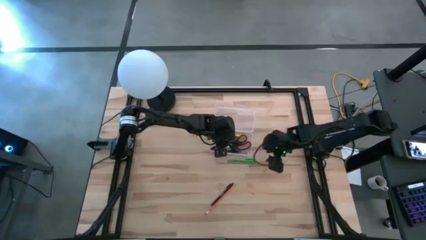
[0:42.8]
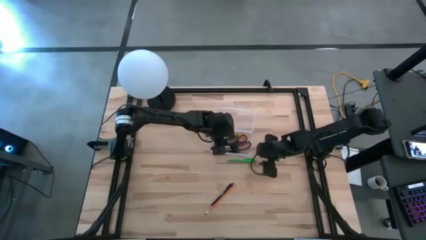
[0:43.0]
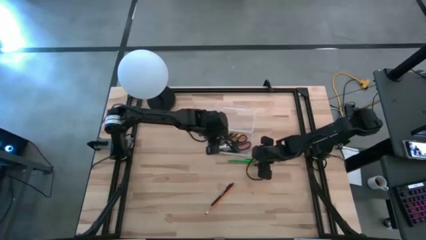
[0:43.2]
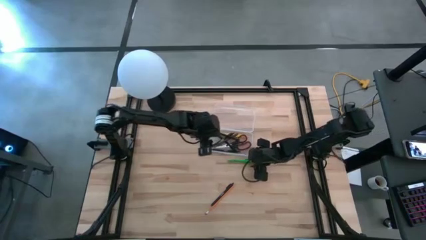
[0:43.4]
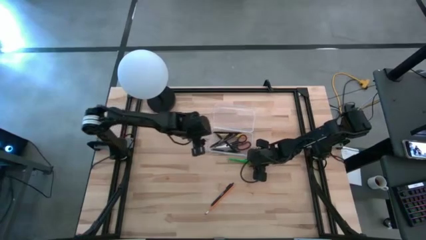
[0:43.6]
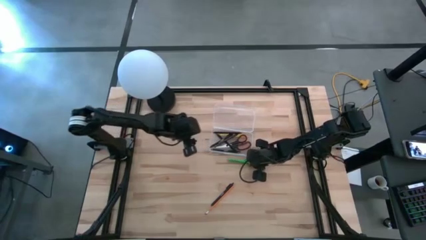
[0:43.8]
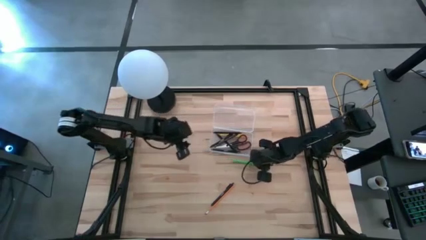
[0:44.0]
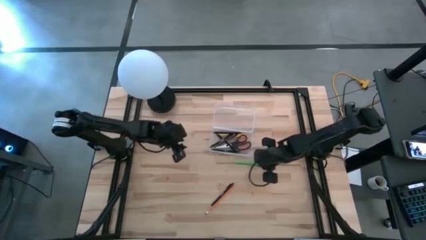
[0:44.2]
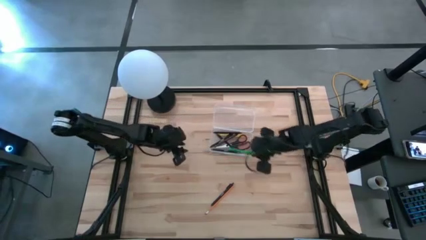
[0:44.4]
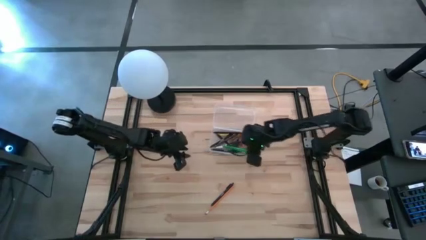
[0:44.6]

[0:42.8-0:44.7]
Task: Pick & place school supplies into a supply box
Put the green pen into the supply box

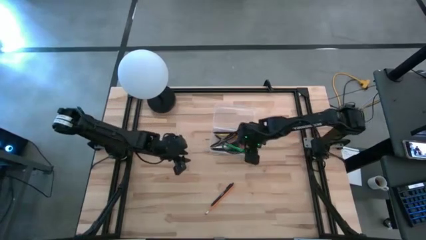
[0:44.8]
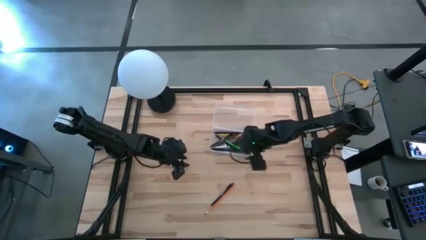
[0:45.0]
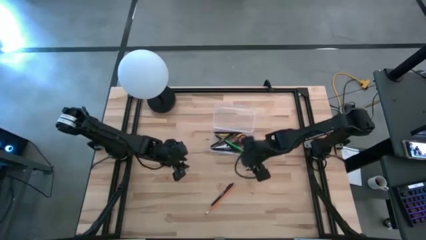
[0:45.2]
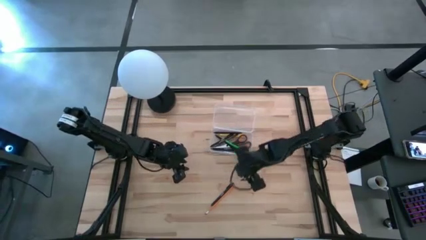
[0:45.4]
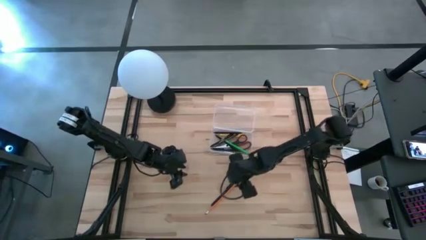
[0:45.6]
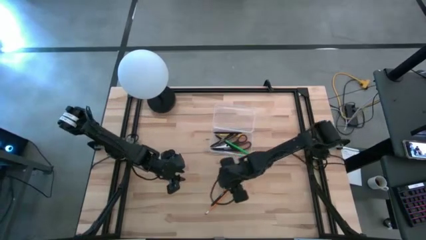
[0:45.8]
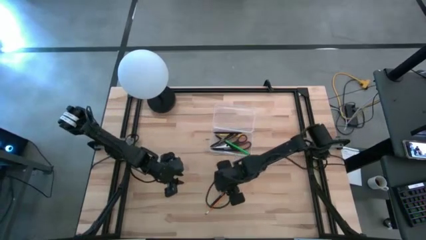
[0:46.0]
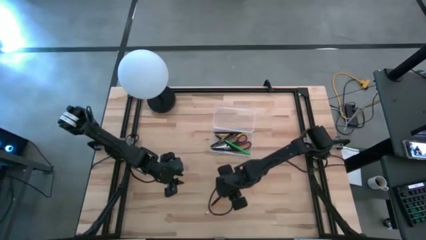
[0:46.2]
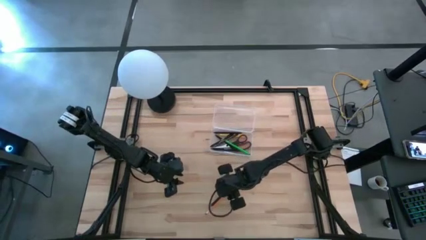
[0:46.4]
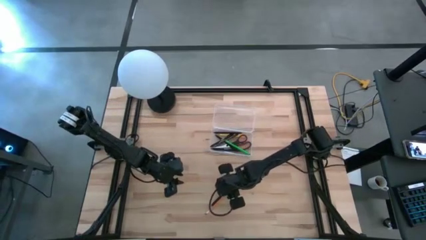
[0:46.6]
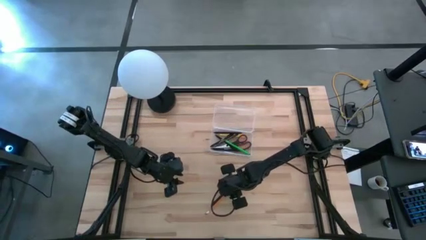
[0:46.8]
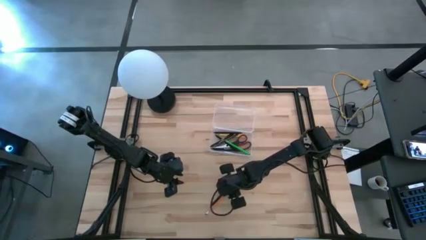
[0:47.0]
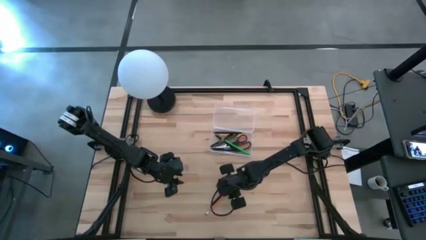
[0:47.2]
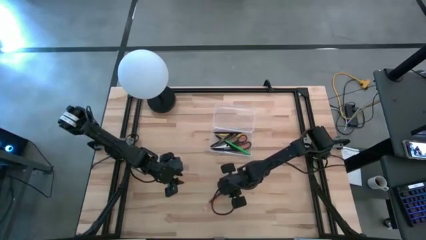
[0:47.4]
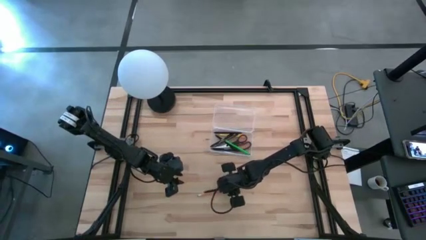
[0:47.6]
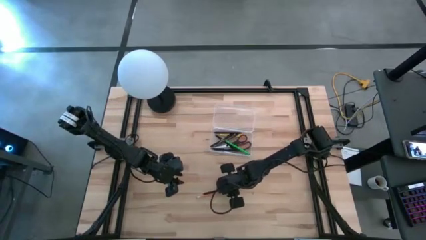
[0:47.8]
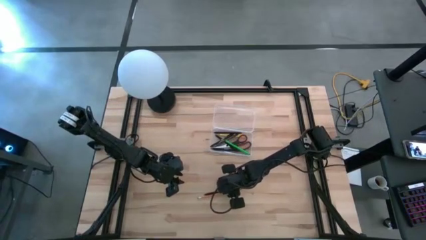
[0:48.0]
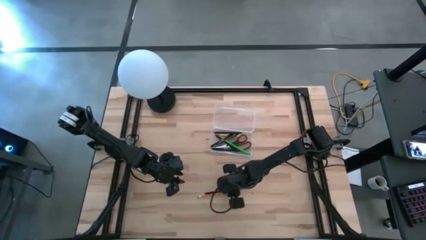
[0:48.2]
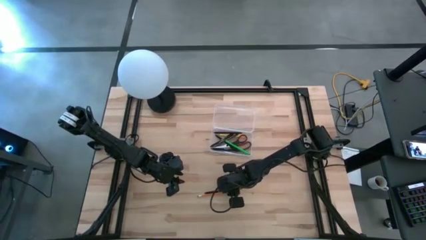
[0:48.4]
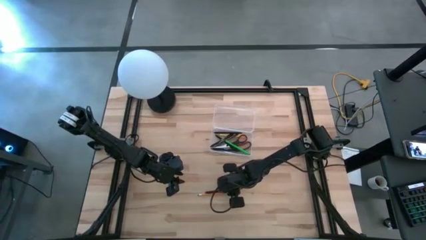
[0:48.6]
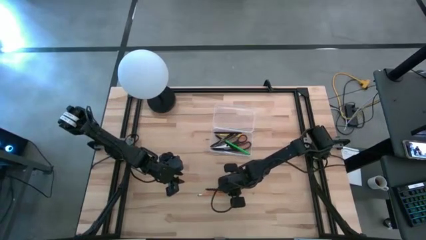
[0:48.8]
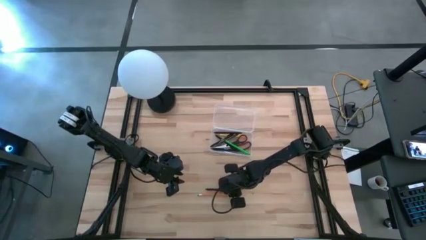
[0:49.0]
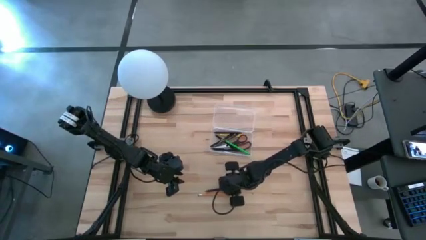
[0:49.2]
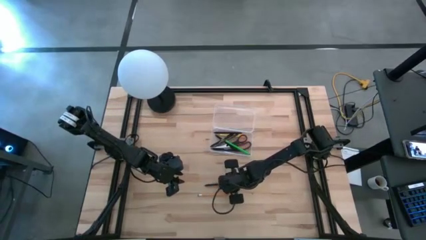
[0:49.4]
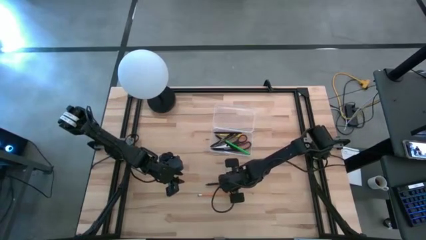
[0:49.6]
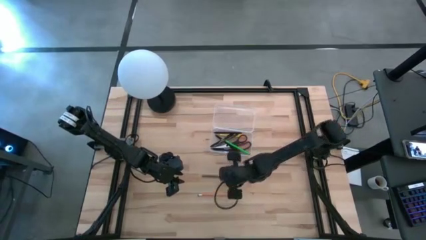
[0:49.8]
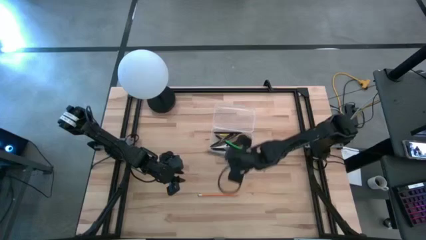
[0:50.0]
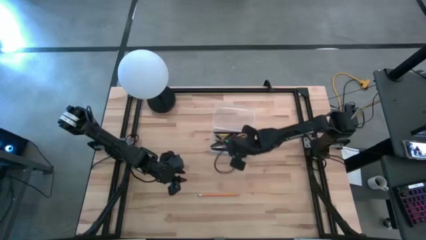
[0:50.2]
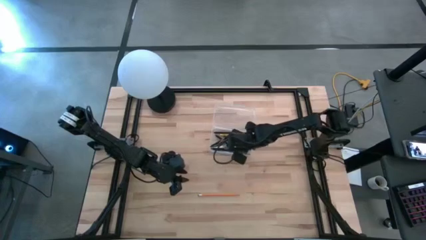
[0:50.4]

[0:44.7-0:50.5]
Put the black pen into the supply box

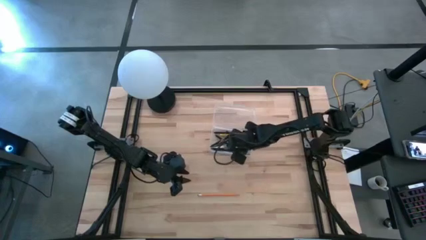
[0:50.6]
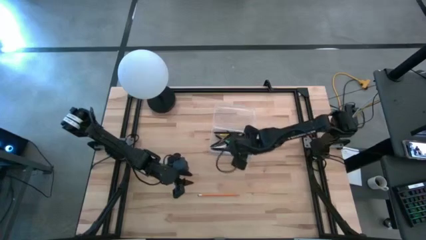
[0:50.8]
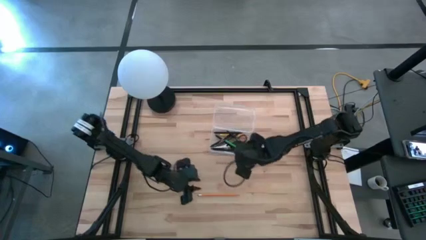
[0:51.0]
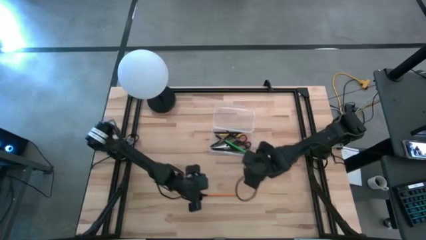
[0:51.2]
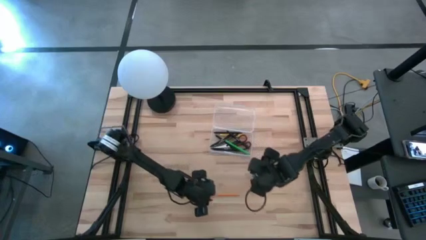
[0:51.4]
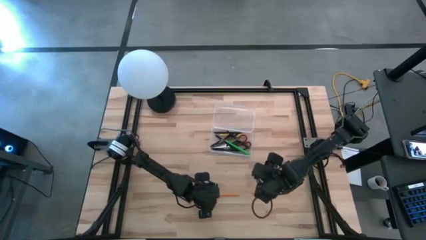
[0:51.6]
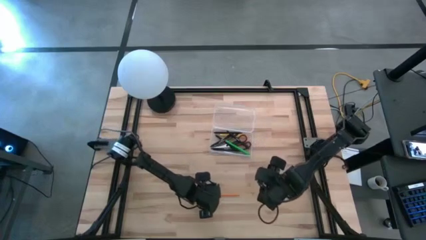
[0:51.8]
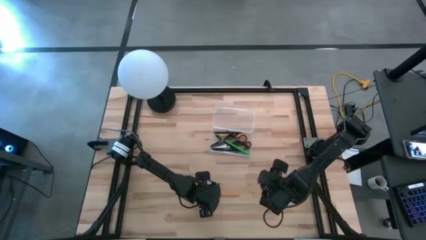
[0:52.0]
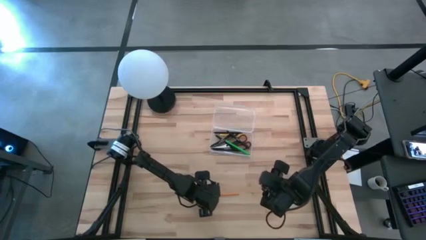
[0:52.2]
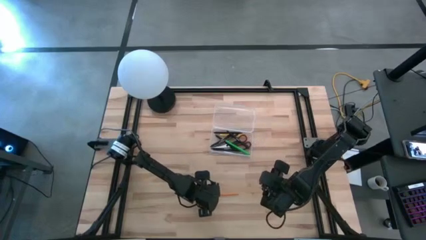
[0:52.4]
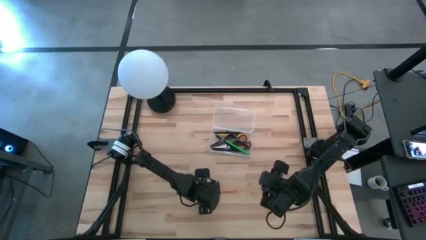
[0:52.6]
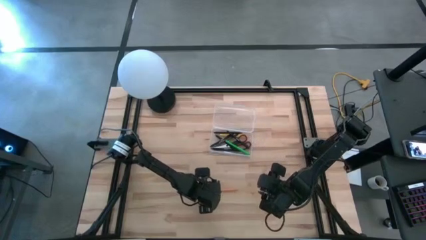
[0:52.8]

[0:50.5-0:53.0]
Put the orange pencil into the supply box

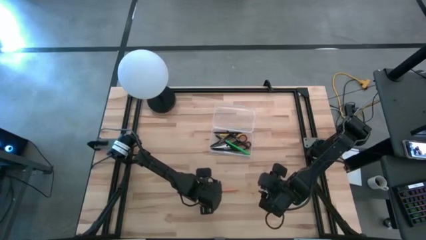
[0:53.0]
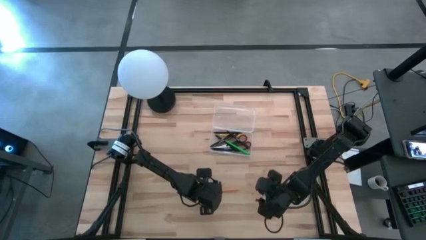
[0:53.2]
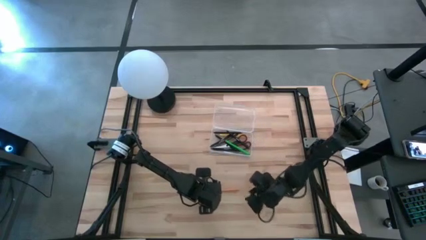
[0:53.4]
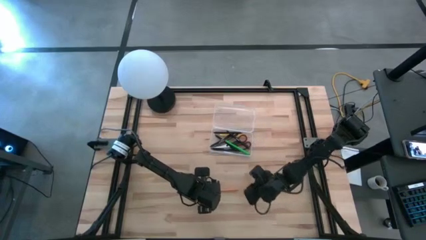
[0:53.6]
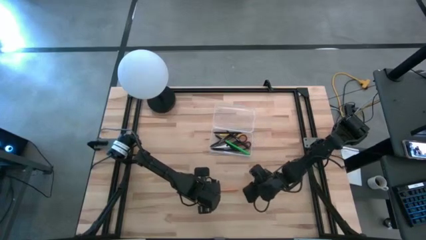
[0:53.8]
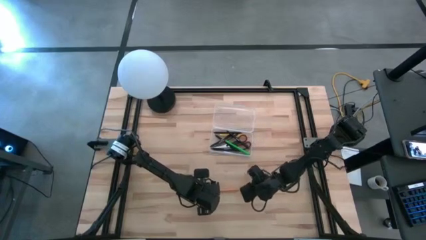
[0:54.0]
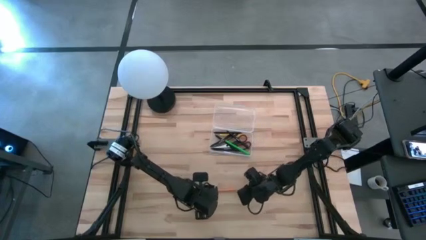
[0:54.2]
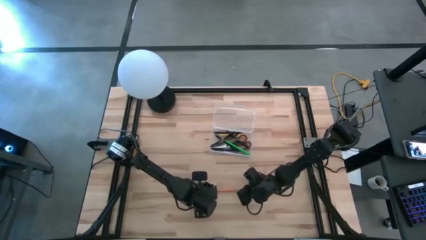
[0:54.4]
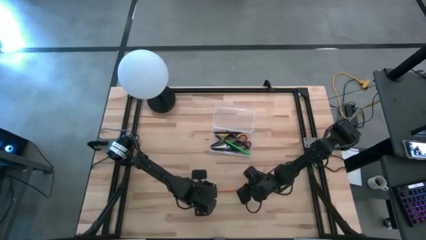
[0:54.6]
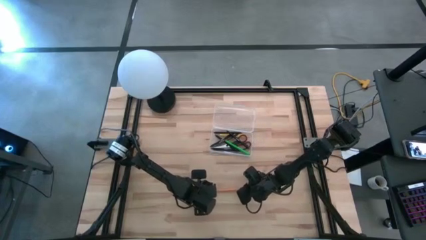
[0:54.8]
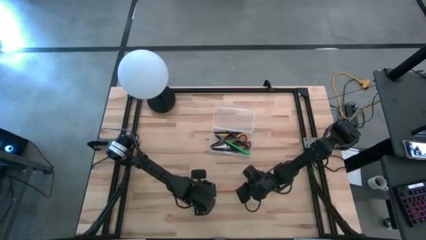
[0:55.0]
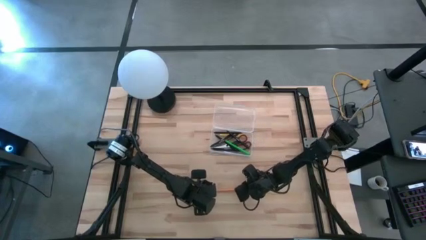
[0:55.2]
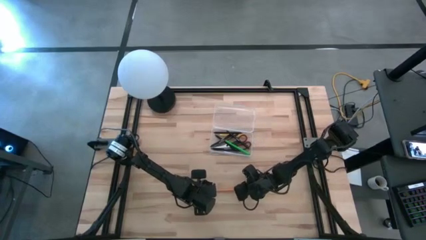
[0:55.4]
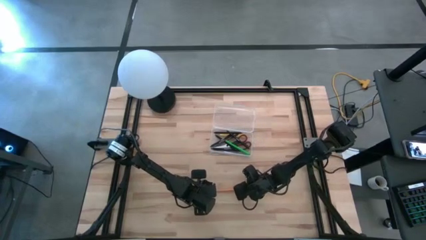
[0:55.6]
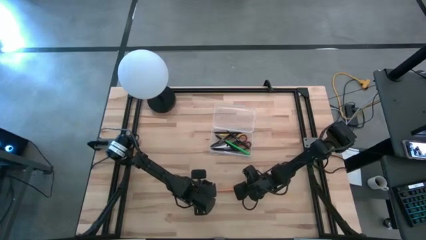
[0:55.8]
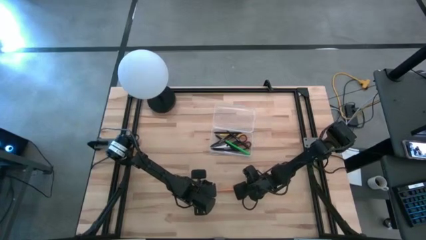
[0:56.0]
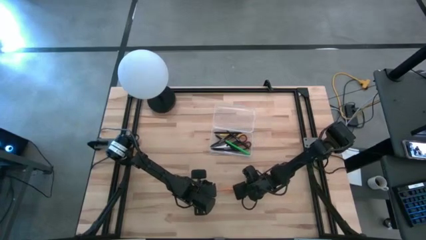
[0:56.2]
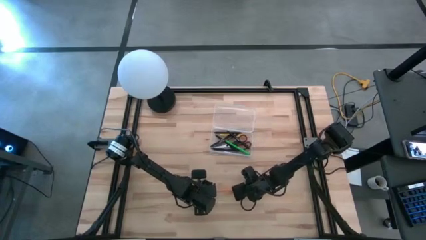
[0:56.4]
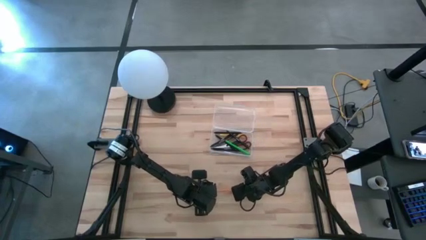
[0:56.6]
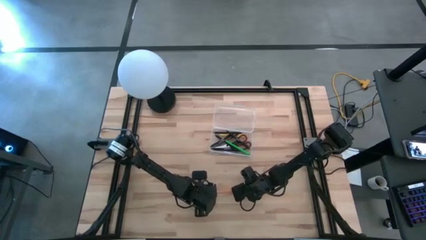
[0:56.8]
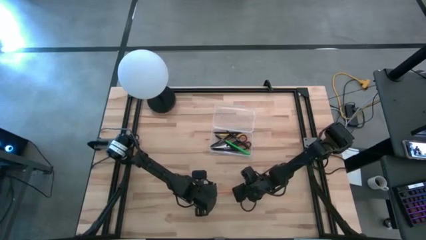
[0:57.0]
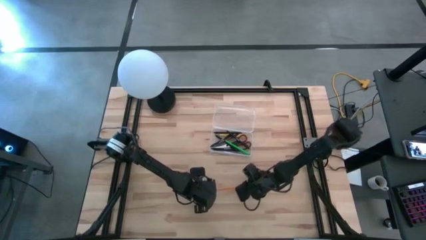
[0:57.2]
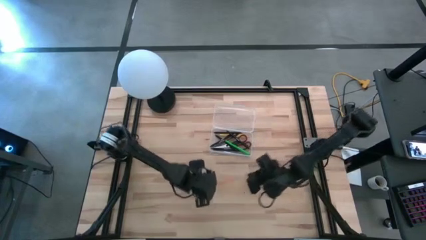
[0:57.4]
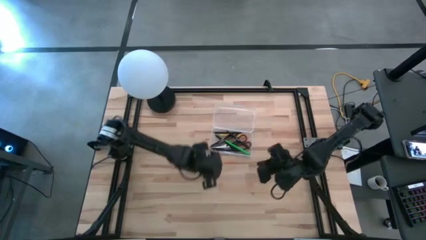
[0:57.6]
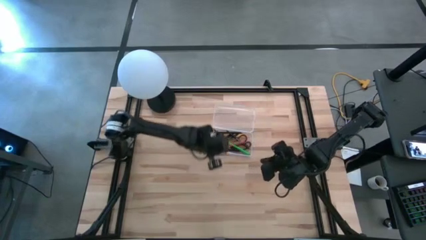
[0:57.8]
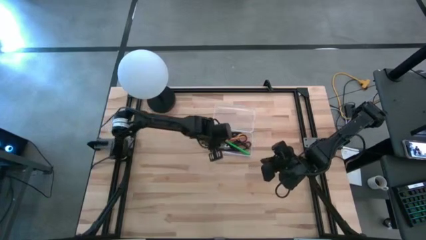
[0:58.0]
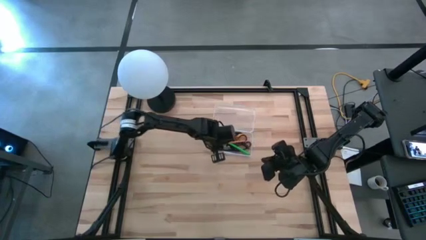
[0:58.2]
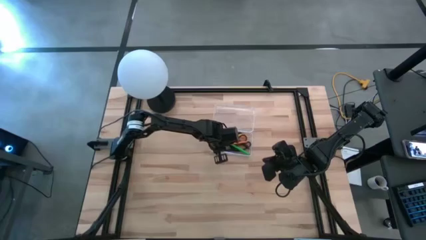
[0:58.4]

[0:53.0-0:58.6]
Put the orange pencil into the supply box
